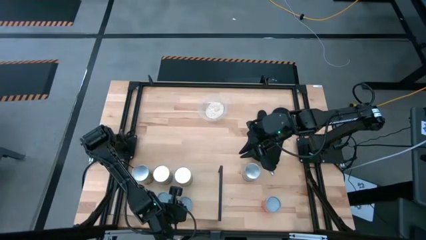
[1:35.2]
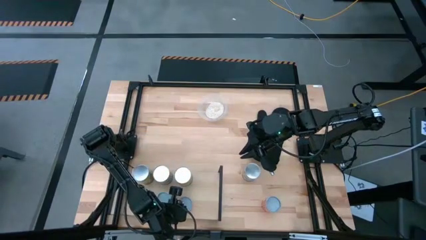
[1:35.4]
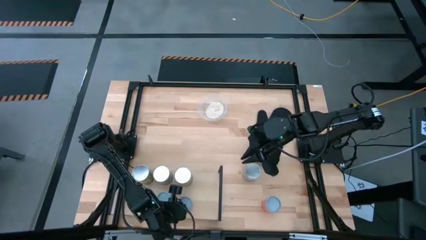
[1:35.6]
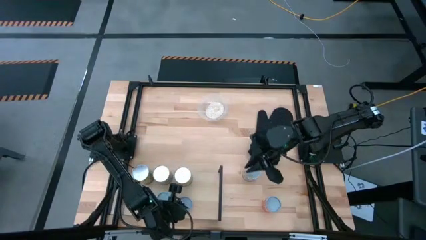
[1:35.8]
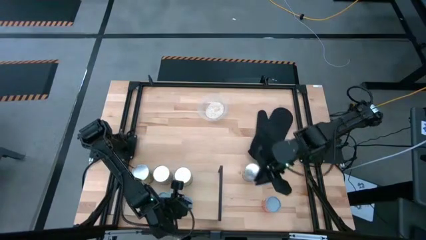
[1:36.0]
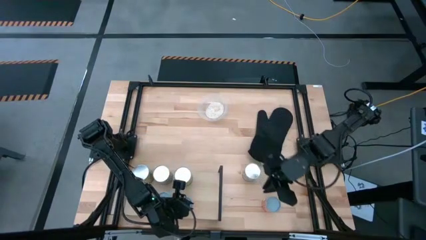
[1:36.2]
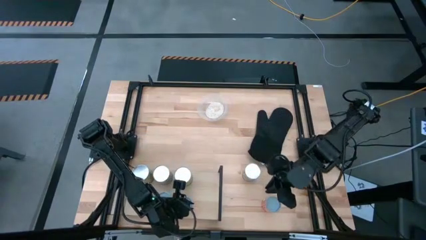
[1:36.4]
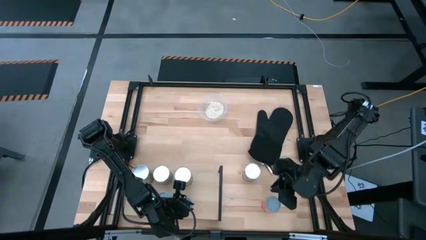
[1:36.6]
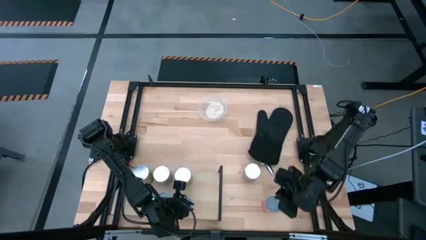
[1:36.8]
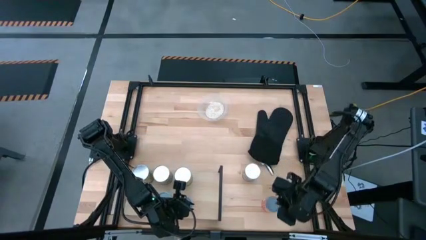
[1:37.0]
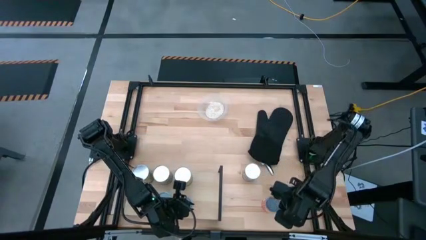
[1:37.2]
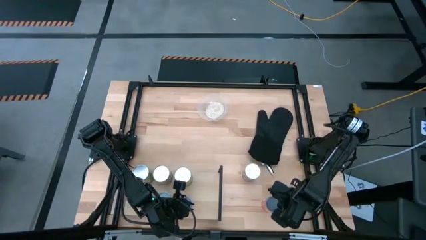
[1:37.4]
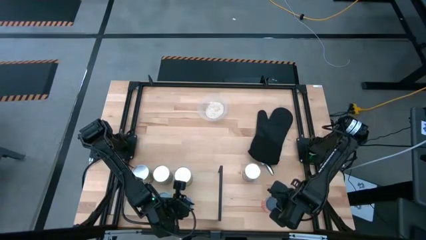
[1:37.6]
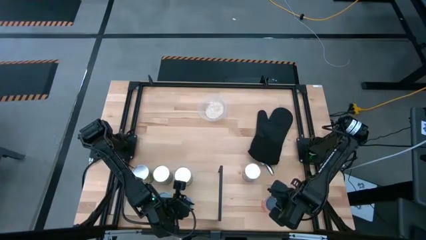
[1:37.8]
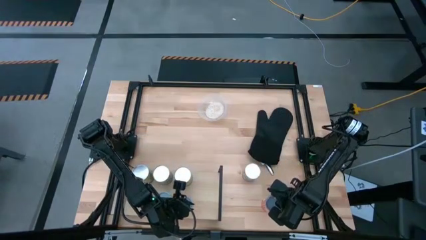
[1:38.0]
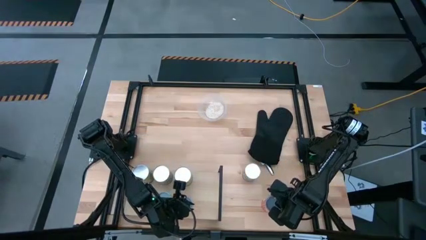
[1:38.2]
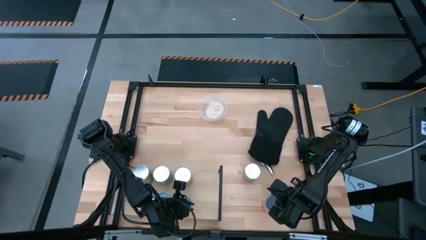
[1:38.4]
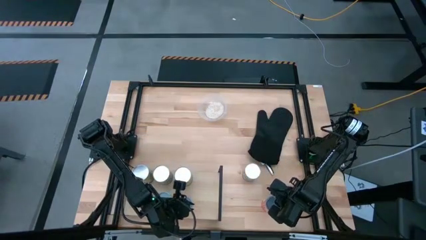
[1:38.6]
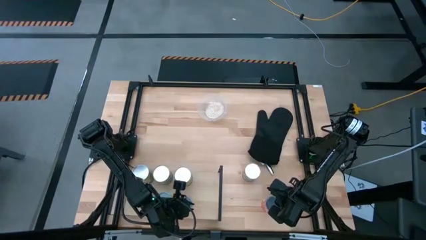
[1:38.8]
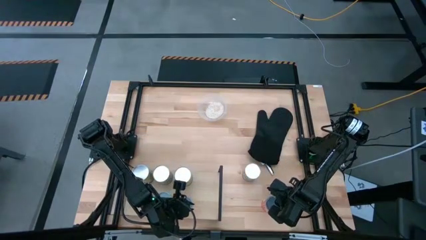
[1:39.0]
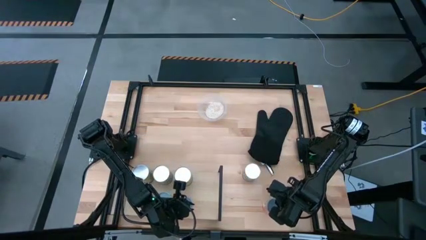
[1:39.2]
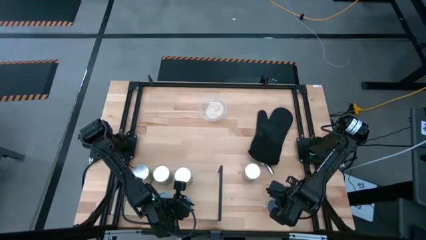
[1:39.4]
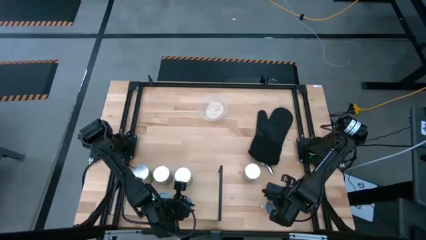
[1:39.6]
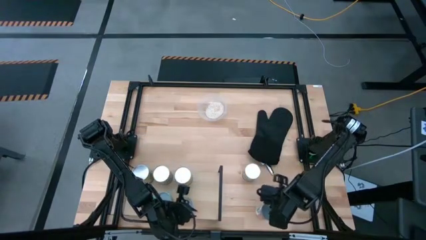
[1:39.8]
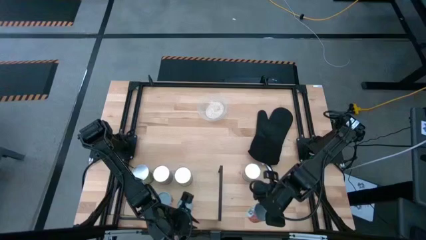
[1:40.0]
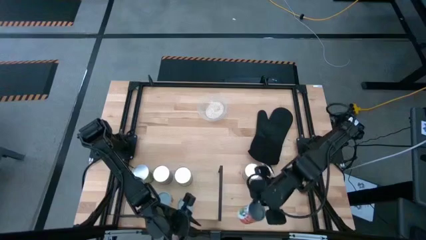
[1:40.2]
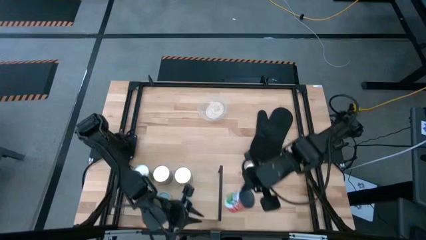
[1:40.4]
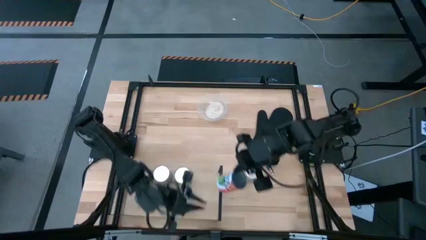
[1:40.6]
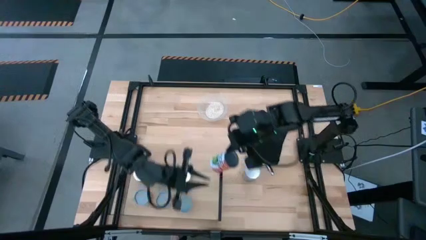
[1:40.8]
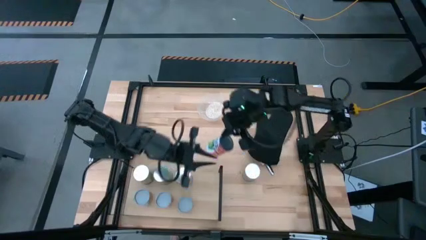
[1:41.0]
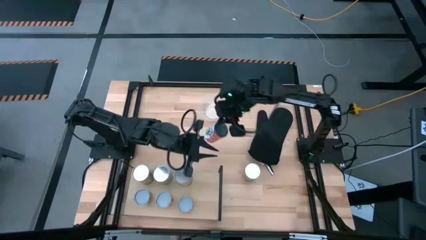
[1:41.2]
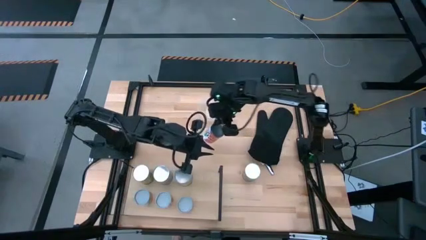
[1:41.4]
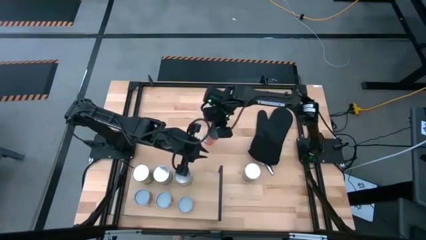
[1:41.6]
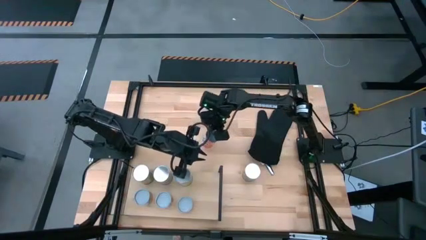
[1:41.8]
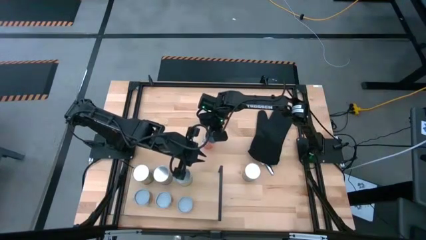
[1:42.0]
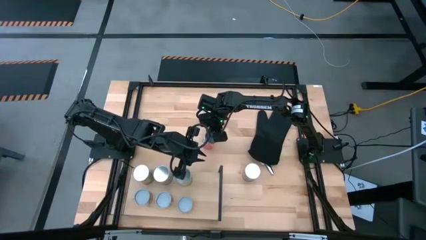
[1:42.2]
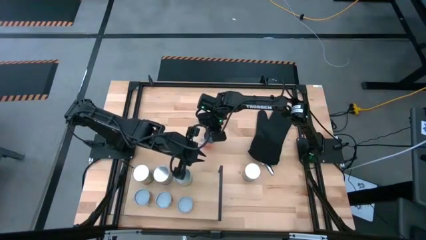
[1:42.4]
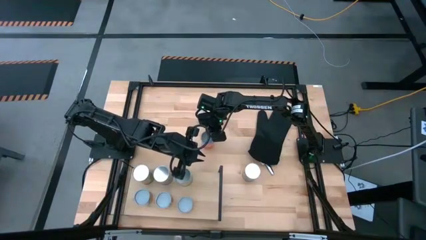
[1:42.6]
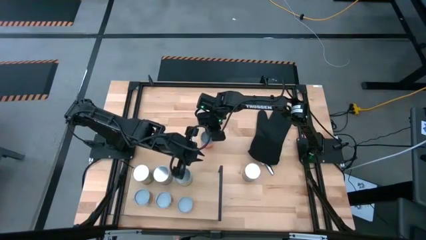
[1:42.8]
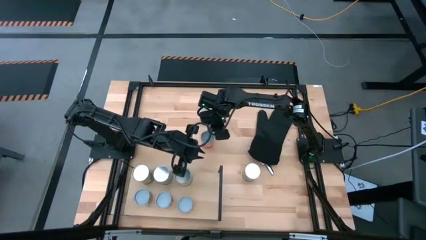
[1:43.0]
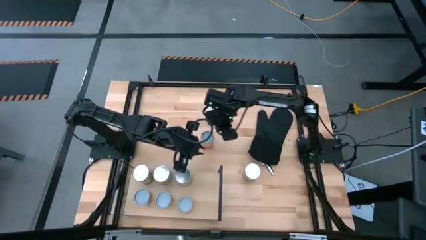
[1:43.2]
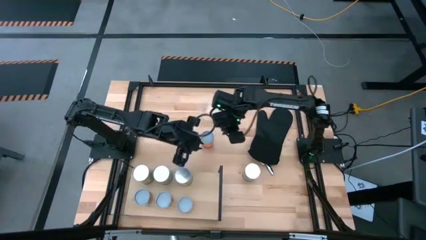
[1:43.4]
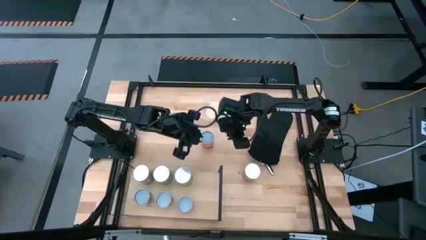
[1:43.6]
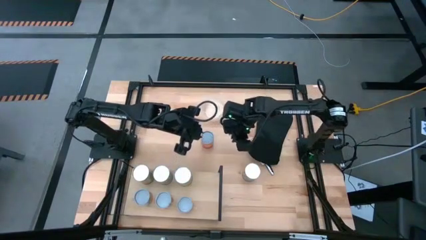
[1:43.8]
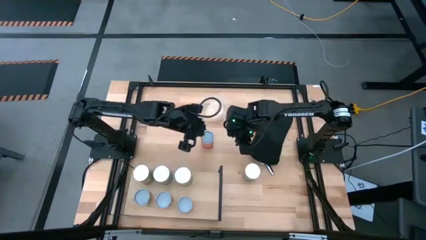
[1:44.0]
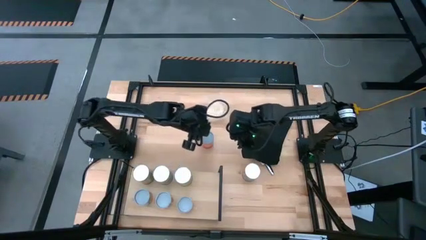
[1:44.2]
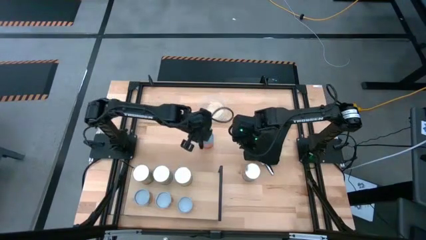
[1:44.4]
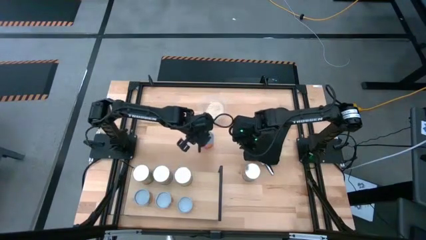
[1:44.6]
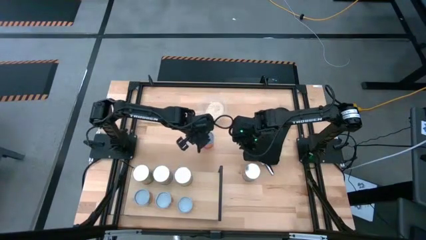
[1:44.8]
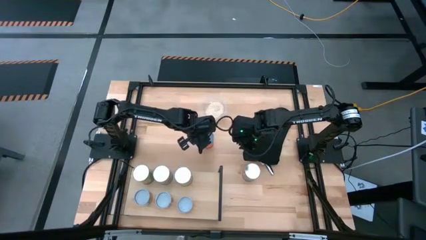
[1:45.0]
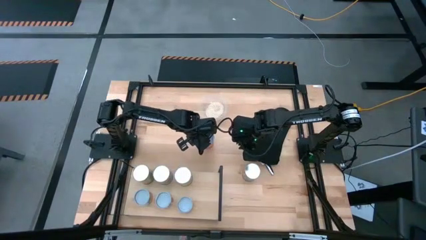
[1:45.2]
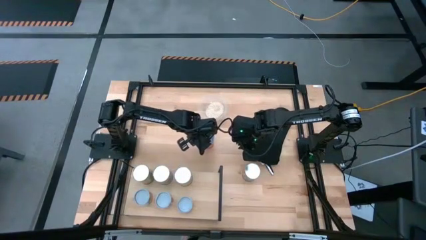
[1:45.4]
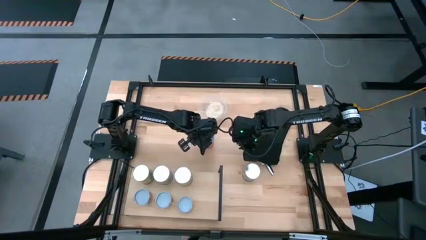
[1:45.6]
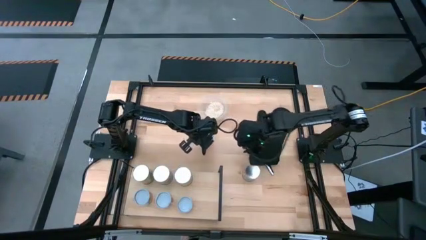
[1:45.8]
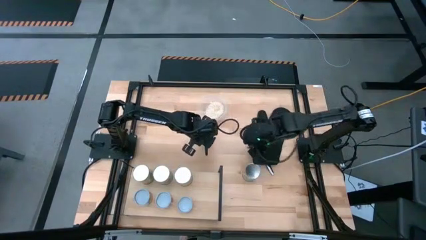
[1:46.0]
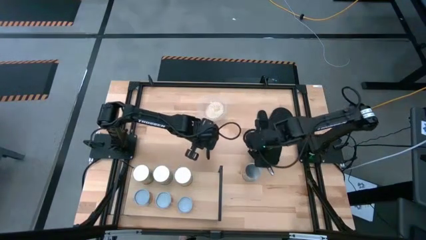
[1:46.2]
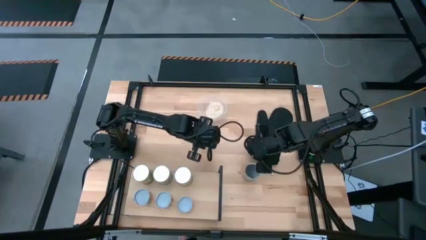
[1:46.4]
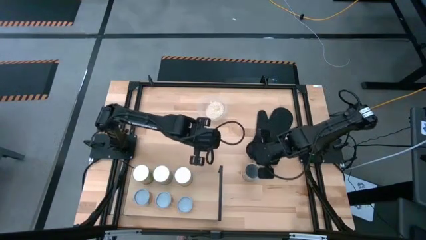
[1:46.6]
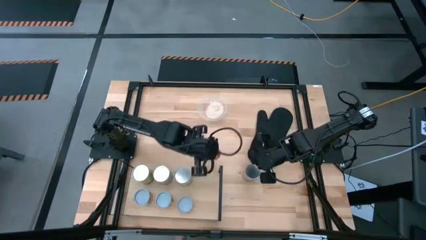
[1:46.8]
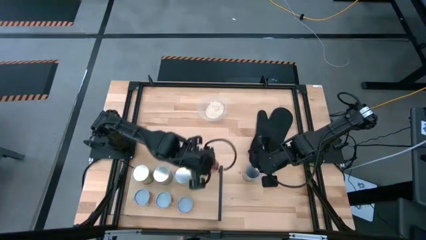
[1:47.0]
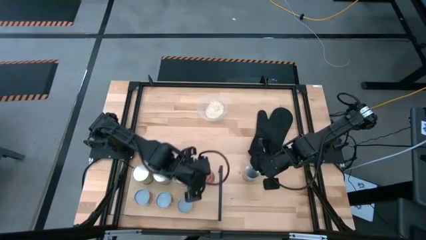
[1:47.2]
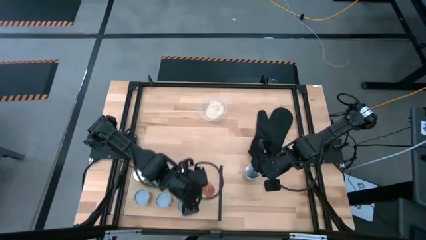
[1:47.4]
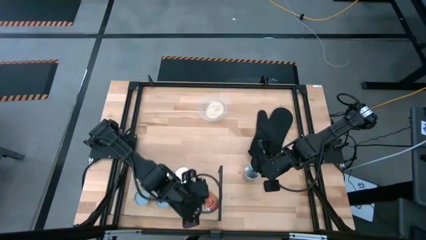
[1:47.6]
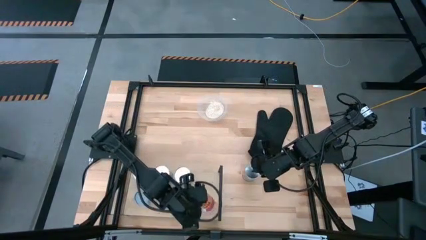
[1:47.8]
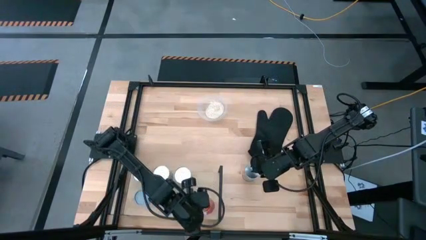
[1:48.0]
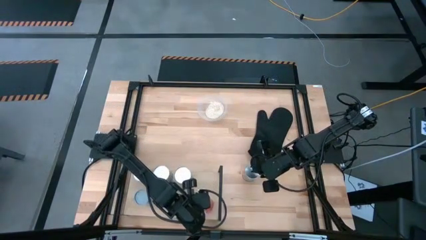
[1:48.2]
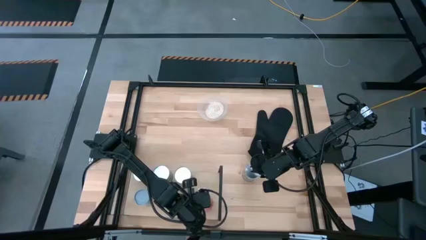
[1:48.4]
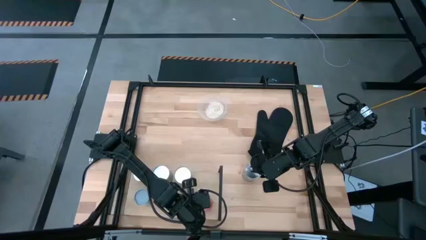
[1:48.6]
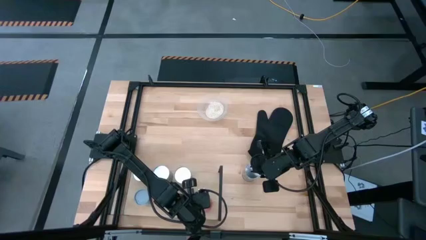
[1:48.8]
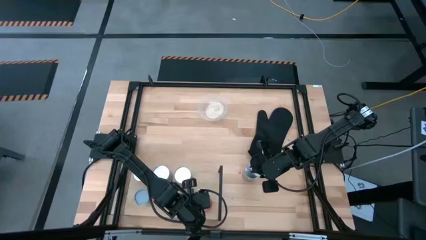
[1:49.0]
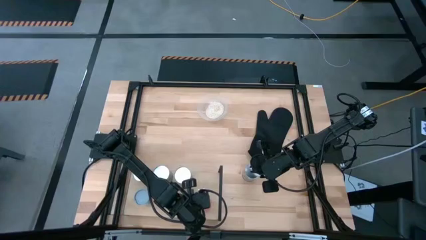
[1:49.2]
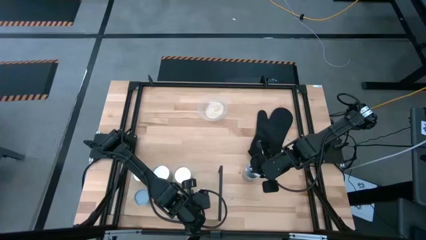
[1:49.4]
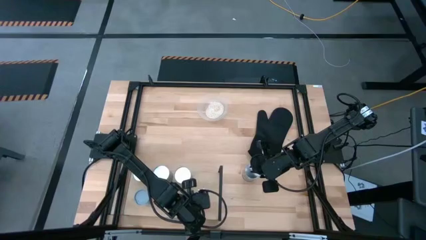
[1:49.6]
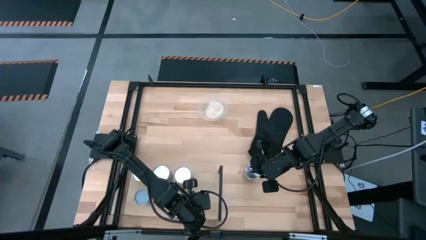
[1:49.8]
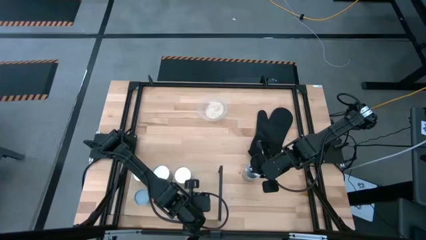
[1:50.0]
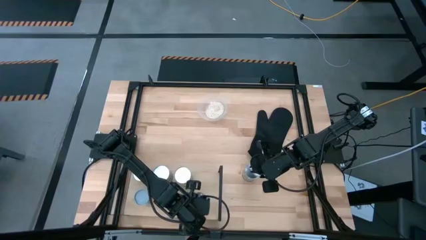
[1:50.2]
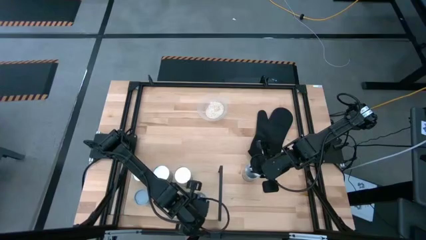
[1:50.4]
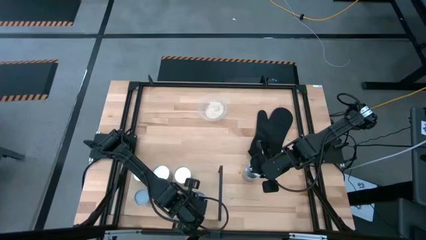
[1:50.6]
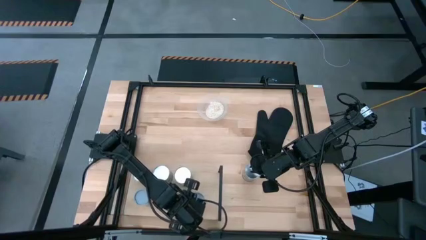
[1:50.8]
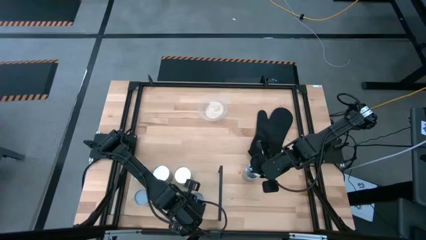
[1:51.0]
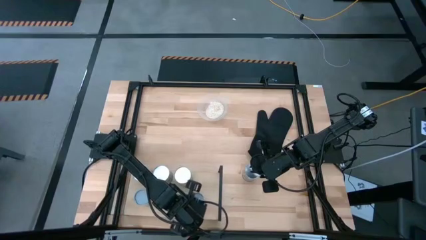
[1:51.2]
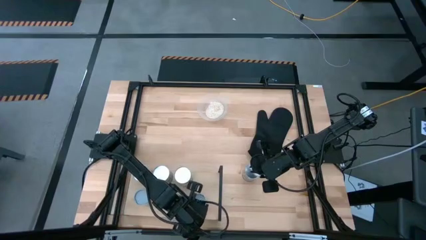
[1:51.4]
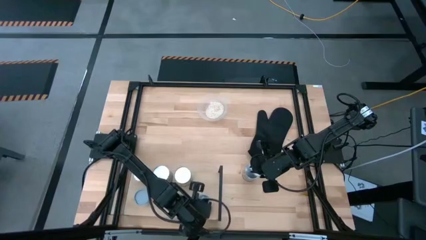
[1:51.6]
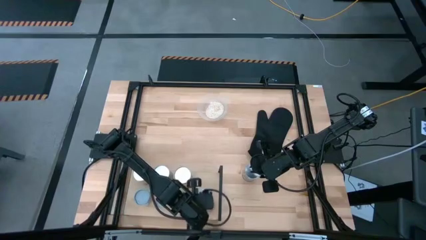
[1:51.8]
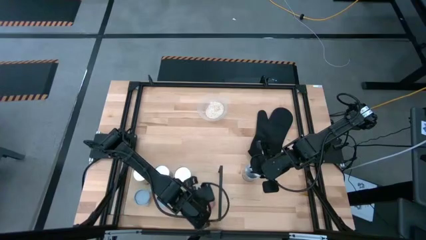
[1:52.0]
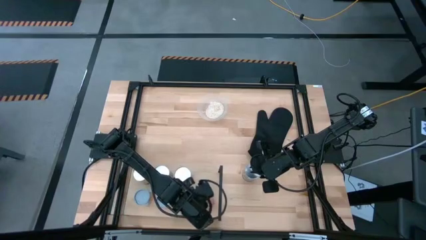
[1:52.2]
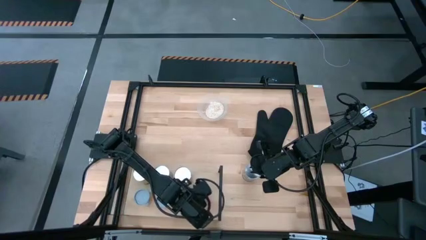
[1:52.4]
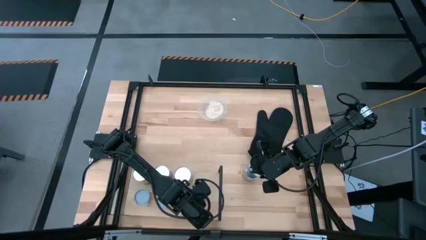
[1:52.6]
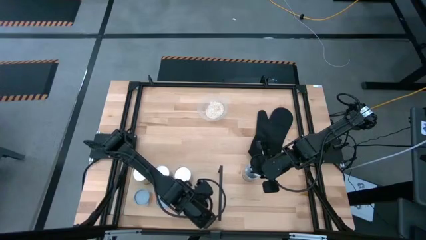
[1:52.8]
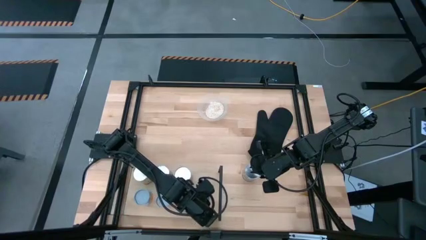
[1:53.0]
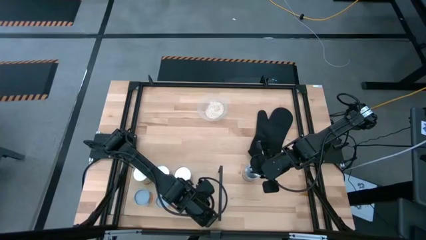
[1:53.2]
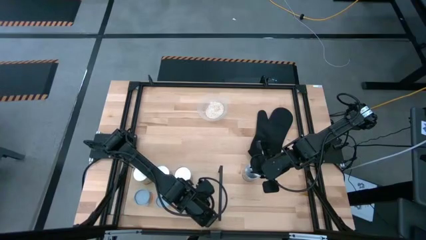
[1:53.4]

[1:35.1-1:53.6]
Task: Pick and place cans onto a shelf
Put the white canned mixed fruit on the shelf
